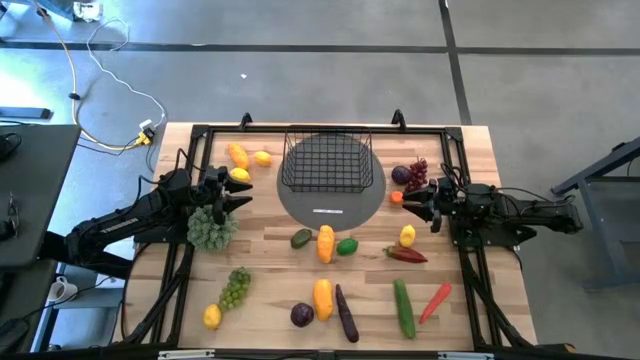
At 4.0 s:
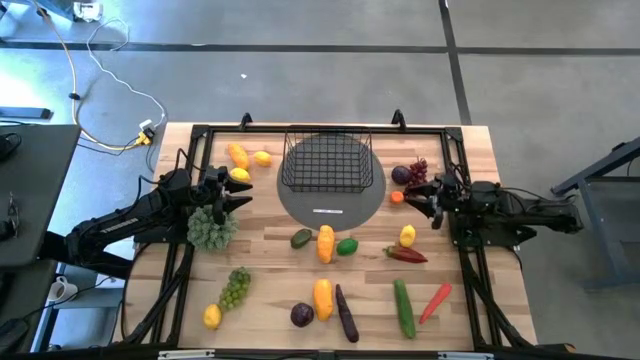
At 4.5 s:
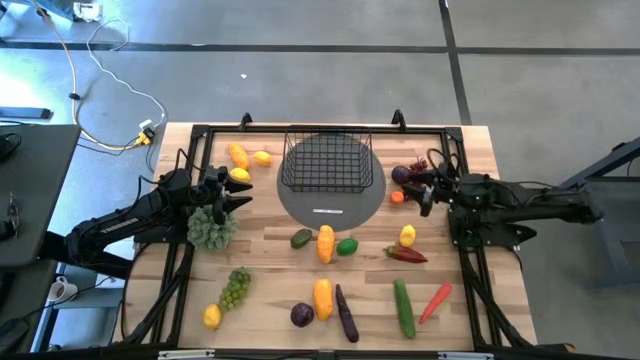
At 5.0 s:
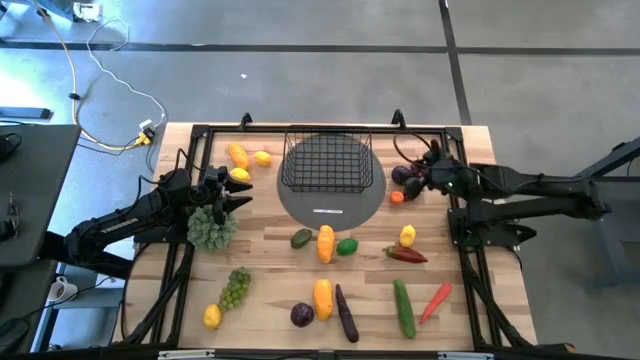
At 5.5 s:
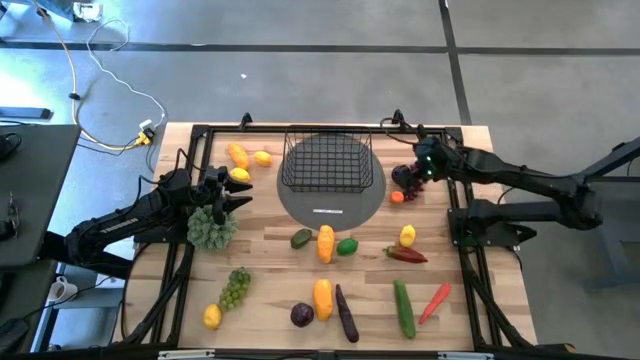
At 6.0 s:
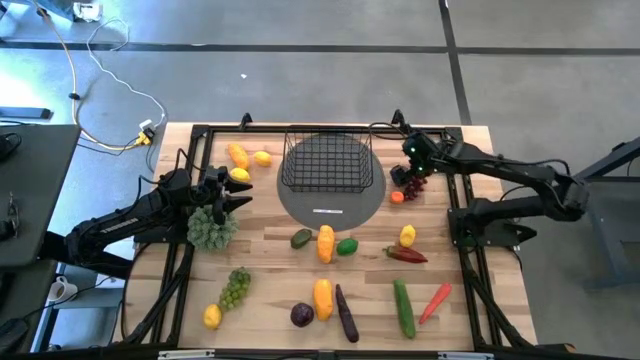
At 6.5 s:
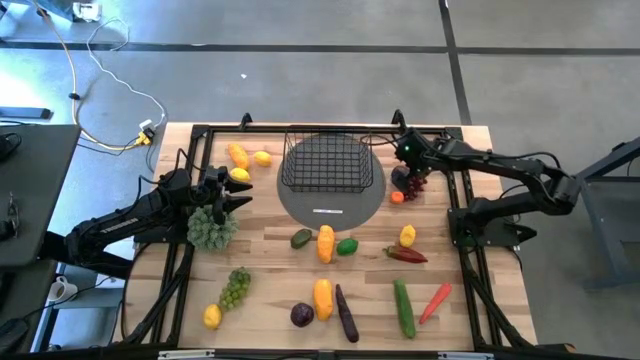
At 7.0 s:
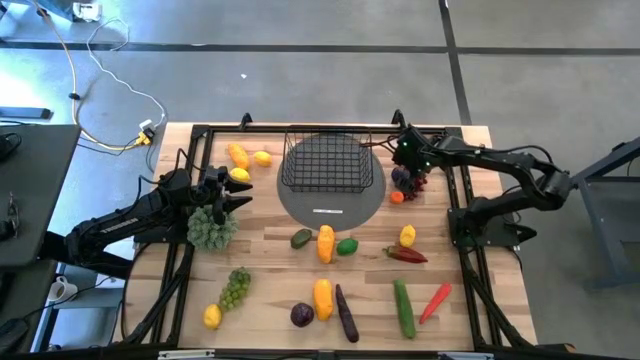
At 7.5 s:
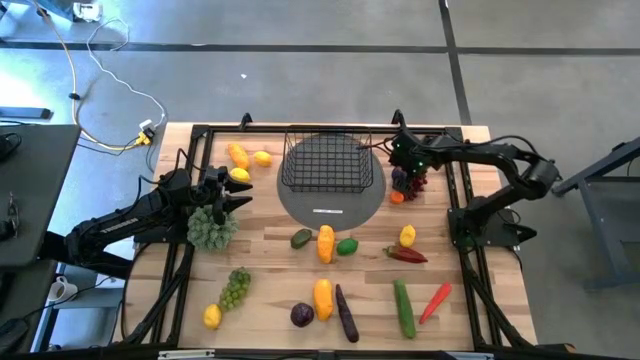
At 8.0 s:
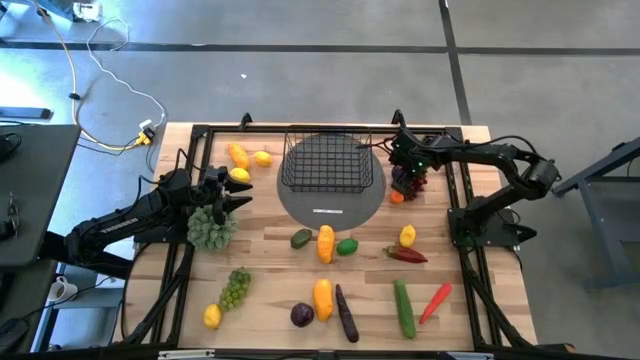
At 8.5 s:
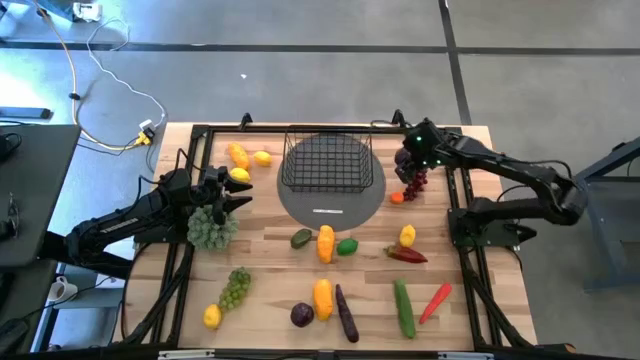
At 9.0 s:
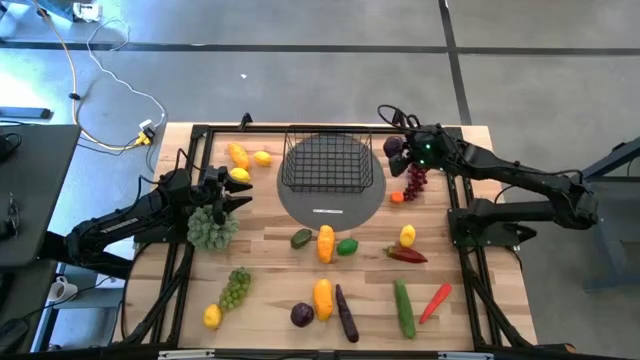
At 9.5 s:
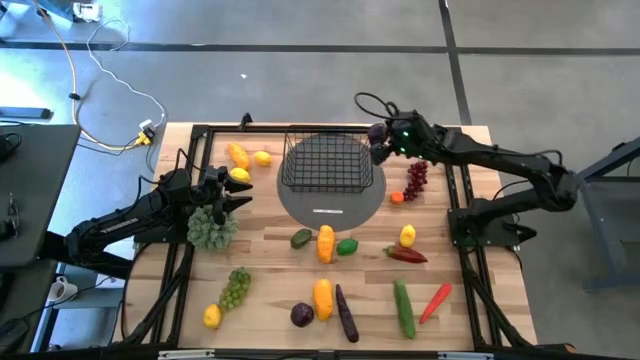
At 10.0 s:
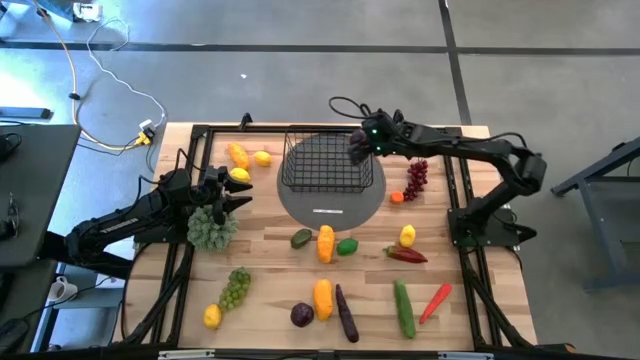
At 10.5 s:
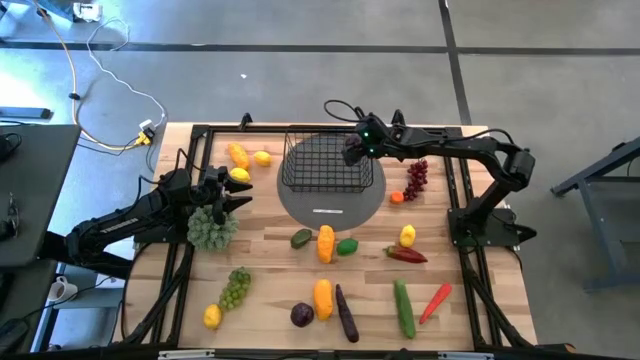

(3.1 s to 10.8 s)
Task: Build produce basket
Put the violet plum into the wire basket

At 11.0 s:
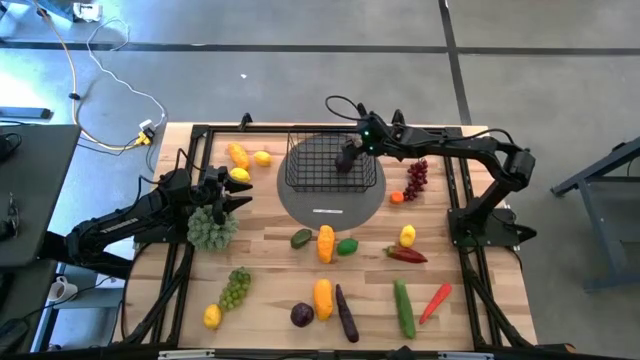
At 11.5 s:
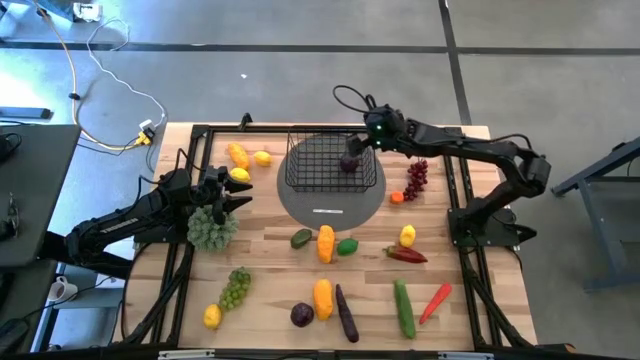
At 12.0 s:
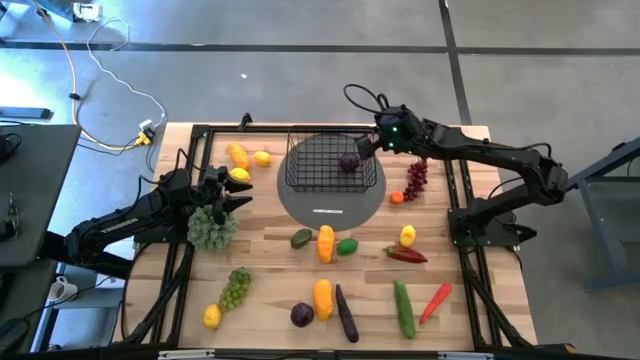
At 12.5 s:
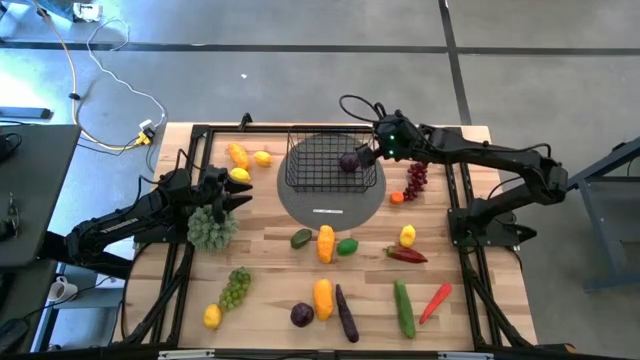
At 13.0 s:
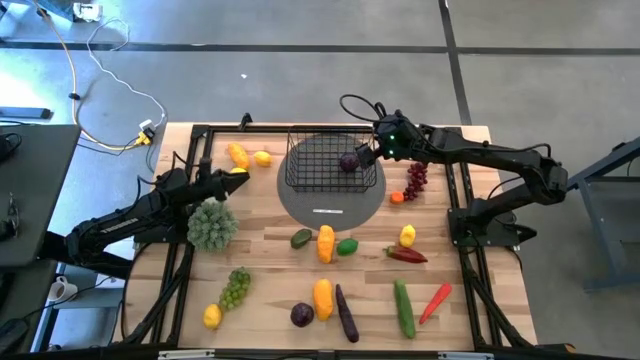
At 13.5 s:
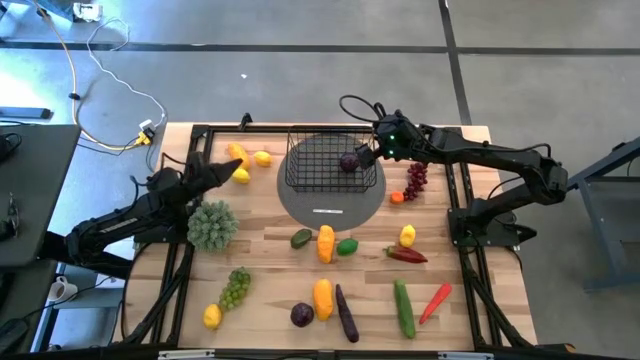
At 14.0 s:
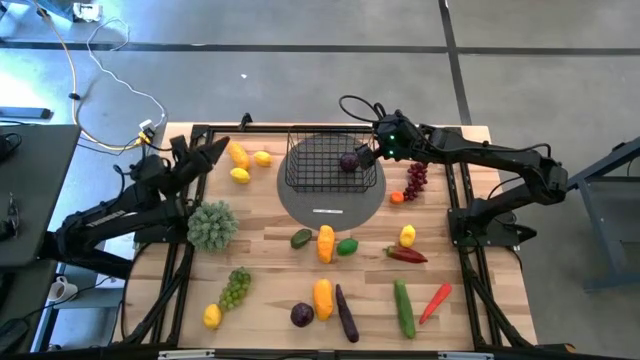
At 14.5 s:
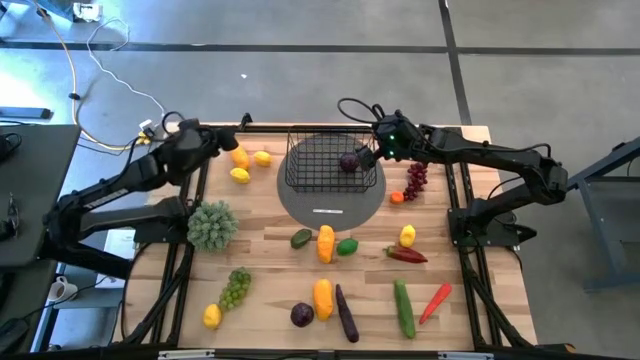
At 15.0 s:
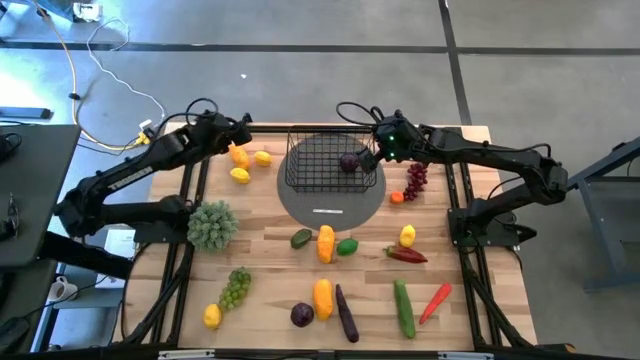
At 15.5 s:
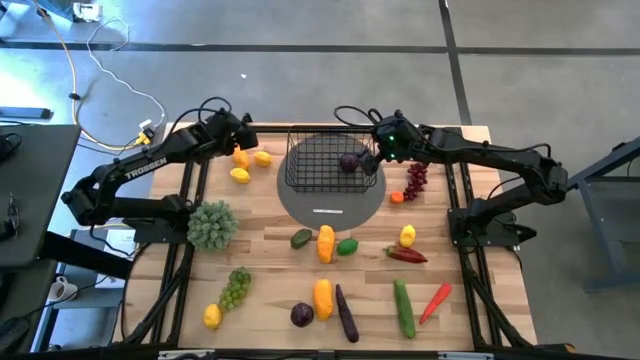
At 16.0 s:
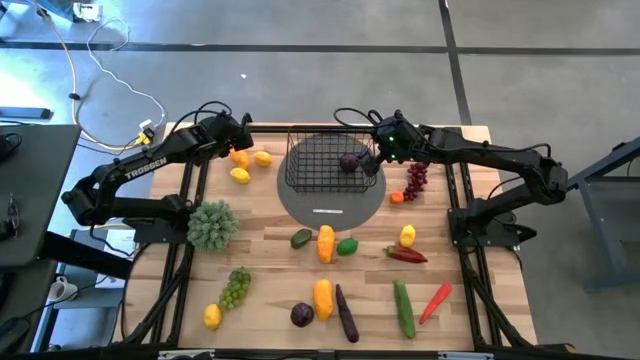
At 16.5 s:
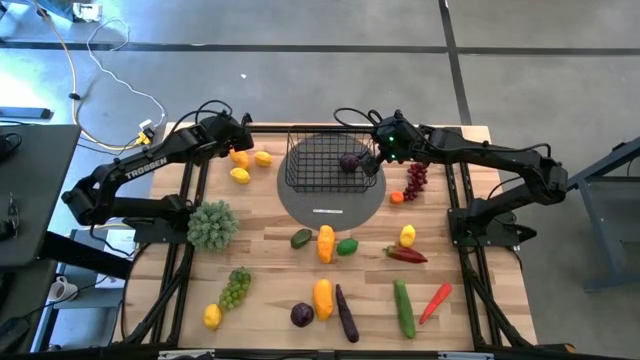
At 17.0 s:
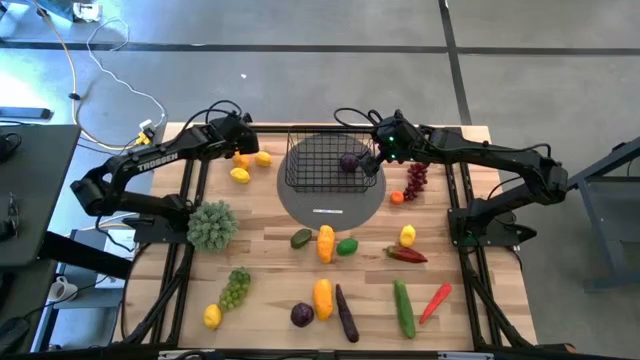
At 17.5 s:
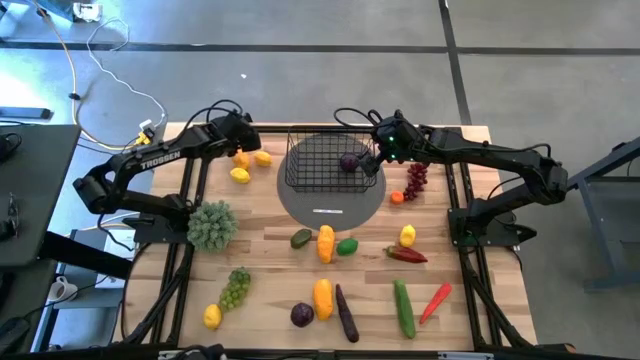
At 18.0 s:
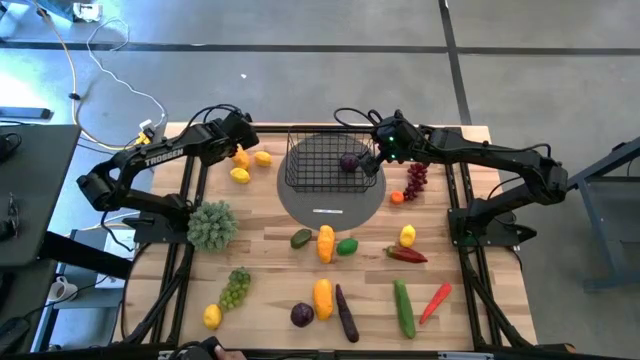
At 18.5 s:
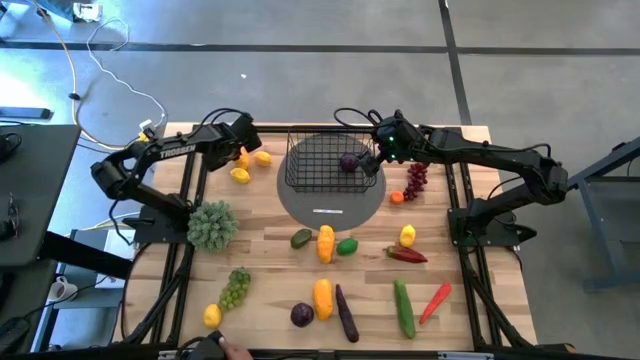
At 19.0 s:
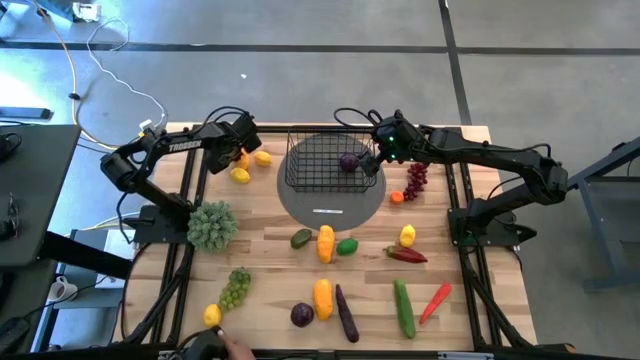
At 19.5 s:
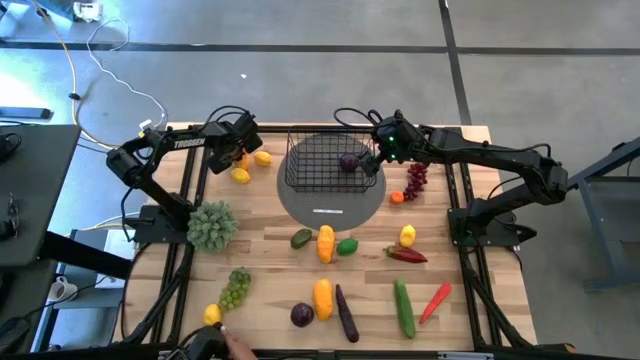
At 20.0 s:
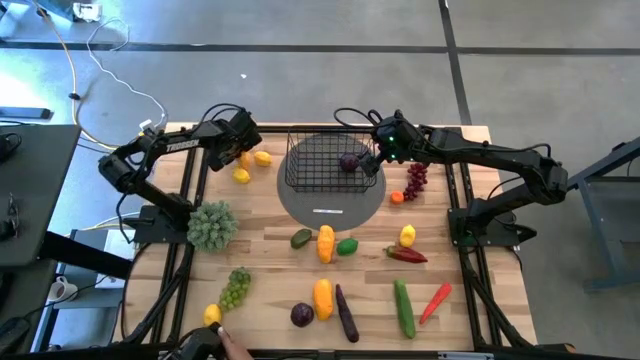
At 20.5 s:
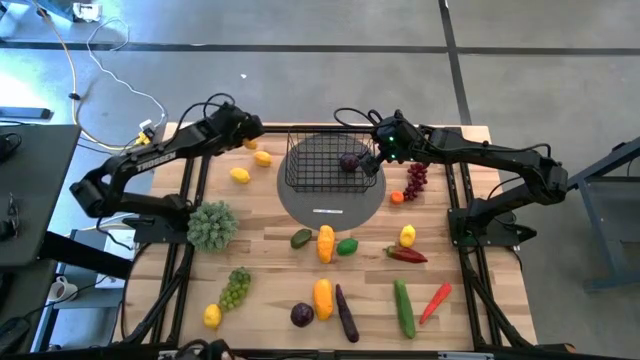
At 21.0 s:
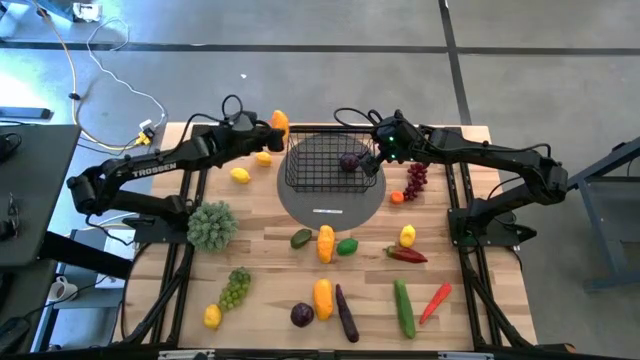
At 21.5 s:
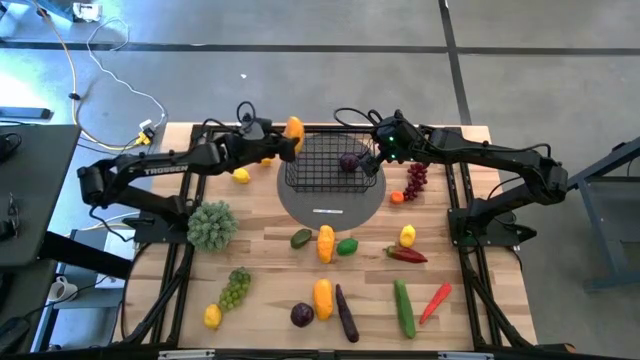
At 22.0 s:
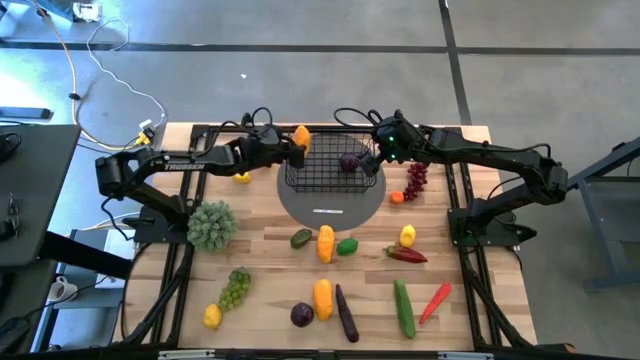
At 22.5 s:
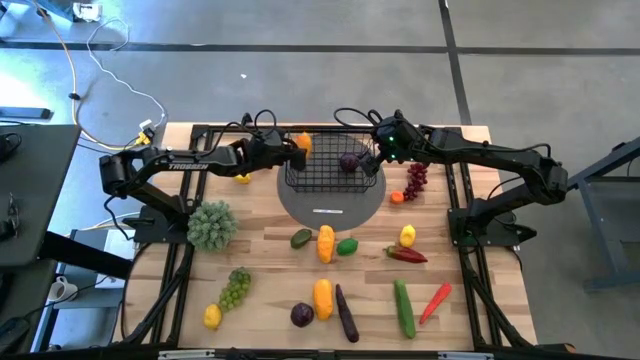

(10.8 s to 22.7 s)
Put the yellow mango into the wire basket

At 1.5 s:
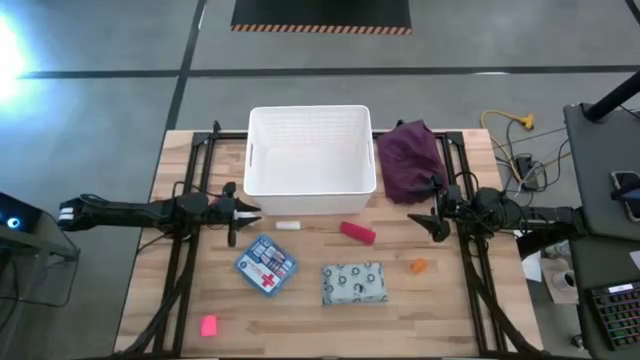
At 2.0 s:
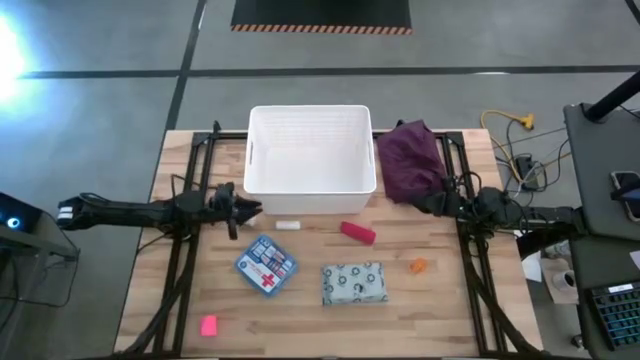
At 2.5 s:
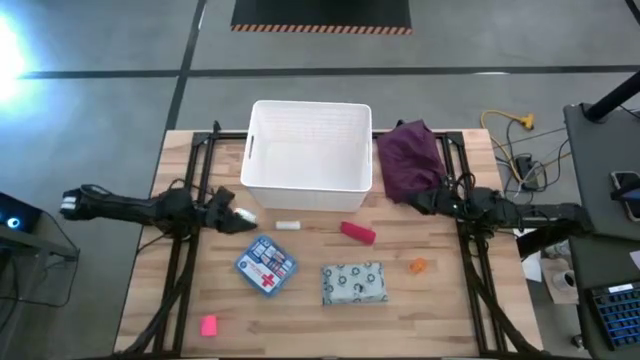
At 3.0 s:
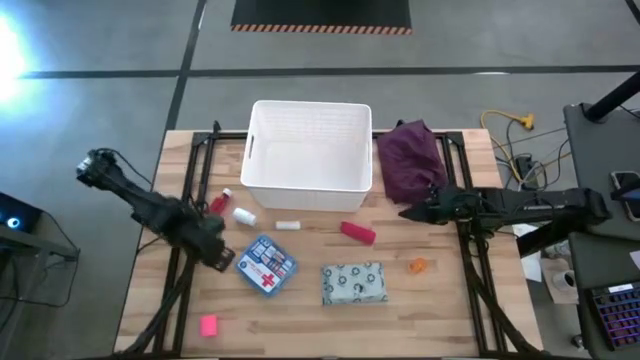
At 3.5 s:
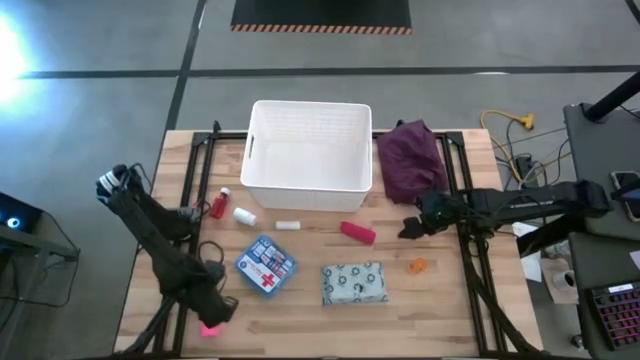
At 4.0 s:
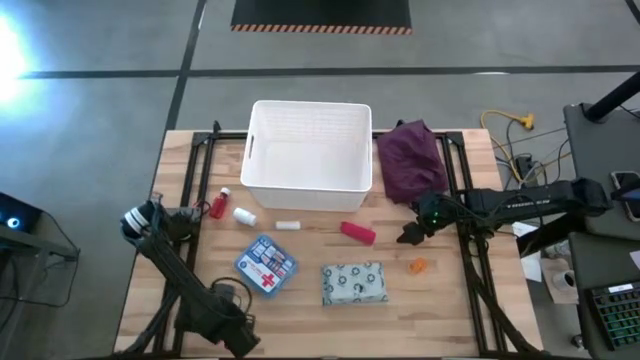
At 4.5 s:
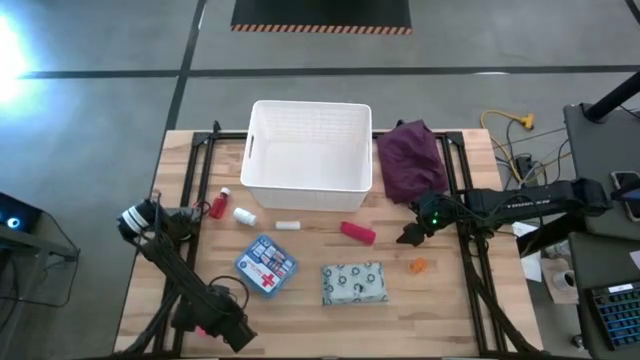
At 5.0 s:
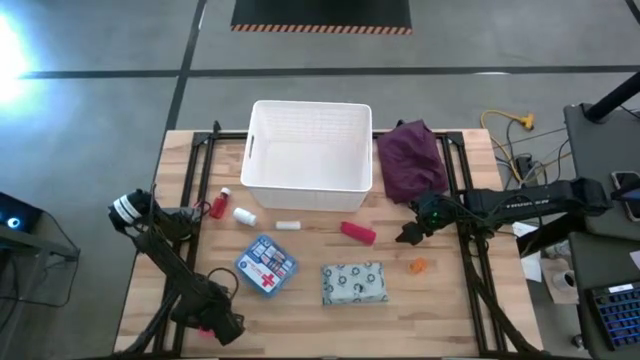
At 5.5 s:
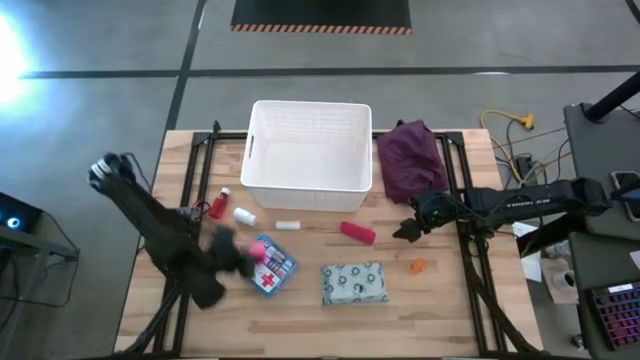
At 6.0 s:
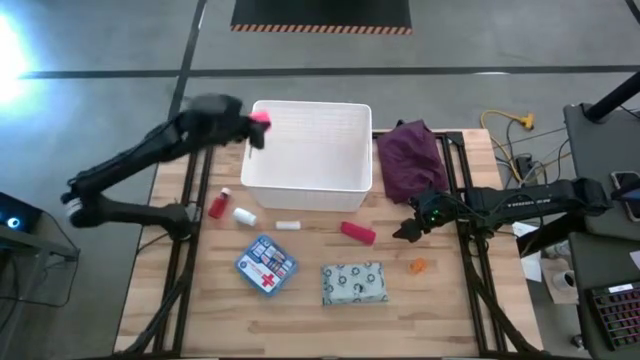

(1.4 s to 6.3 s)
Task: Pick & place medical supplies in basket/bin
Put the pink bandage into the white bin
